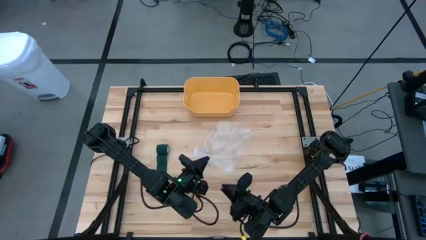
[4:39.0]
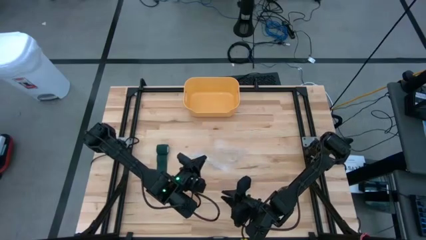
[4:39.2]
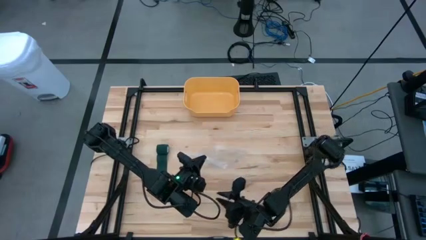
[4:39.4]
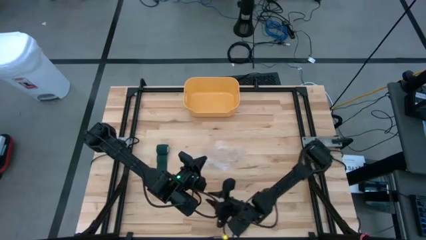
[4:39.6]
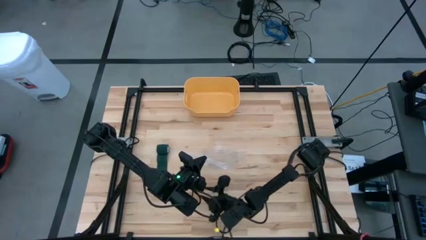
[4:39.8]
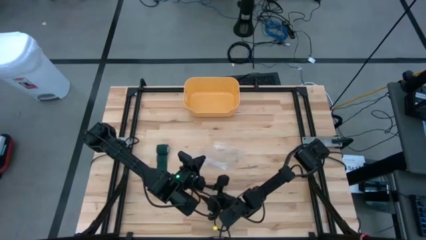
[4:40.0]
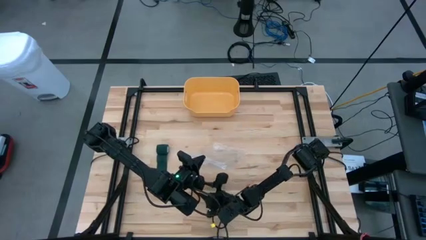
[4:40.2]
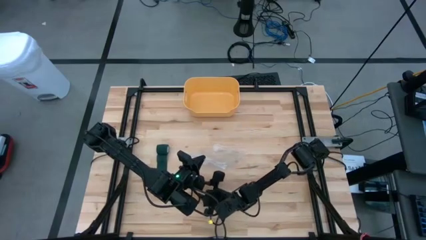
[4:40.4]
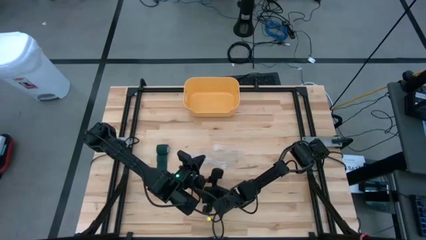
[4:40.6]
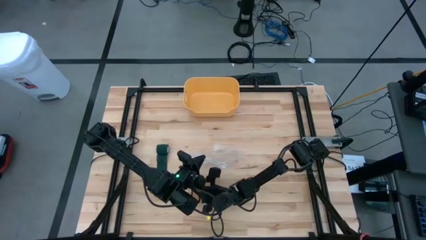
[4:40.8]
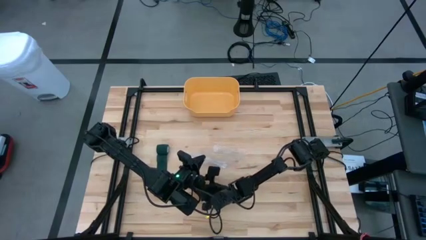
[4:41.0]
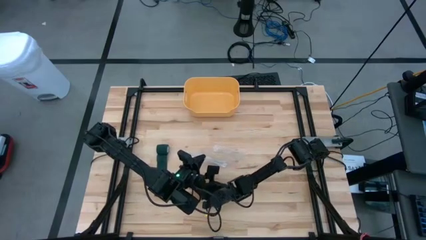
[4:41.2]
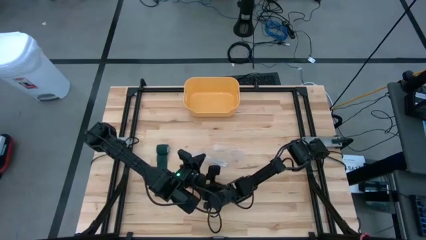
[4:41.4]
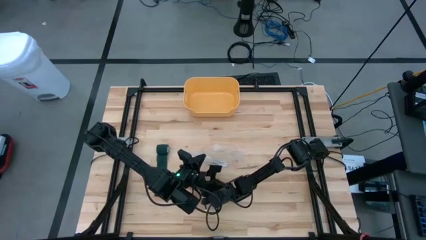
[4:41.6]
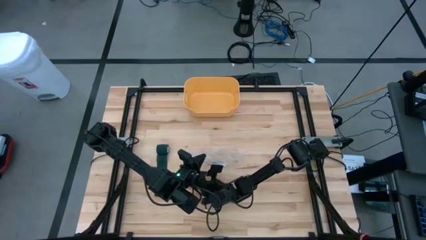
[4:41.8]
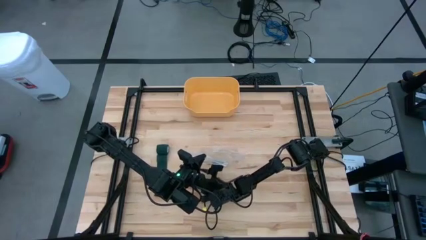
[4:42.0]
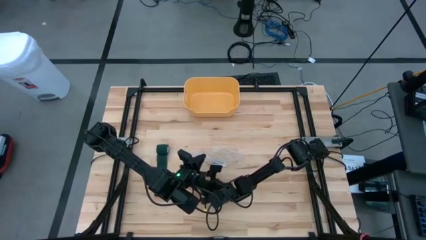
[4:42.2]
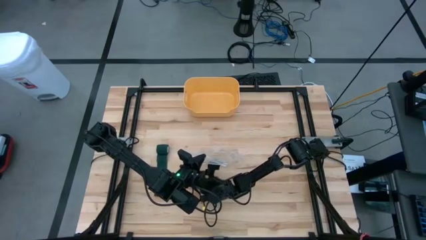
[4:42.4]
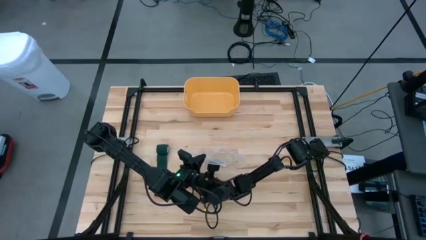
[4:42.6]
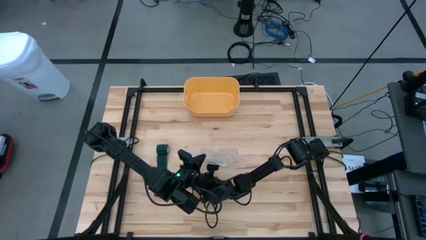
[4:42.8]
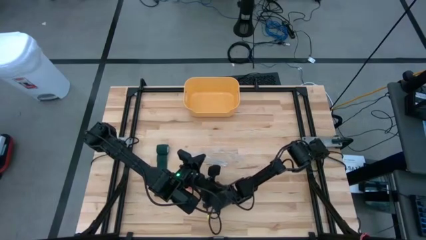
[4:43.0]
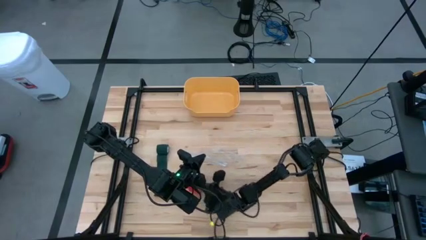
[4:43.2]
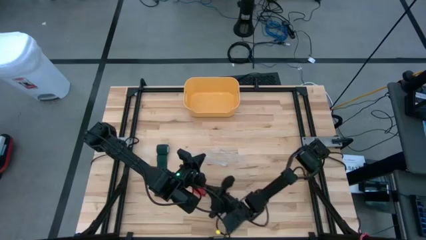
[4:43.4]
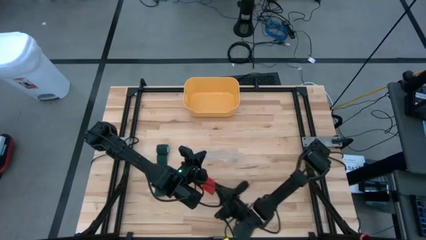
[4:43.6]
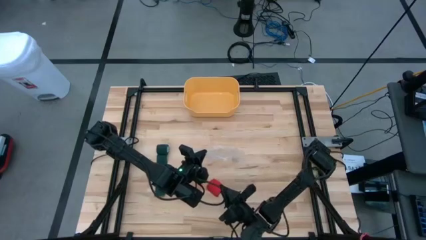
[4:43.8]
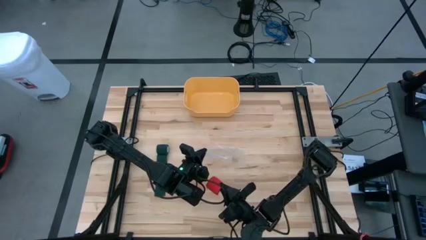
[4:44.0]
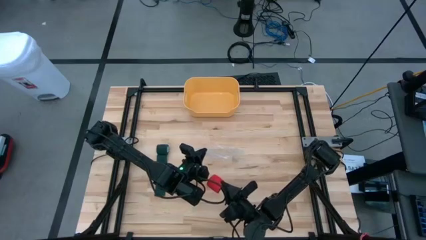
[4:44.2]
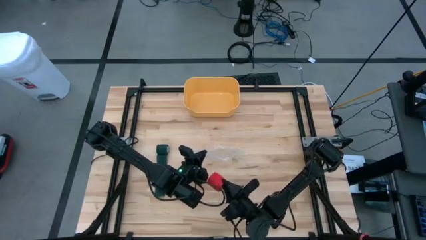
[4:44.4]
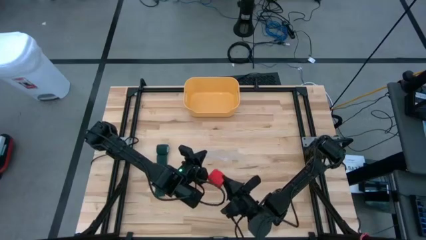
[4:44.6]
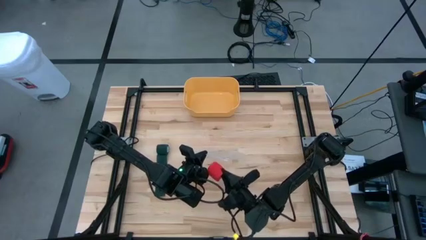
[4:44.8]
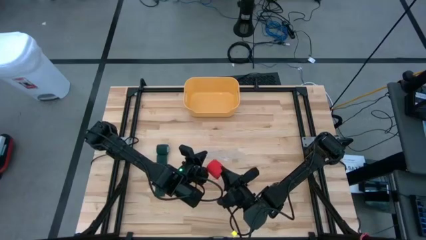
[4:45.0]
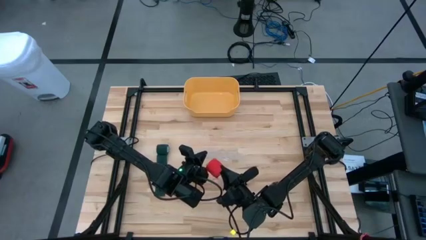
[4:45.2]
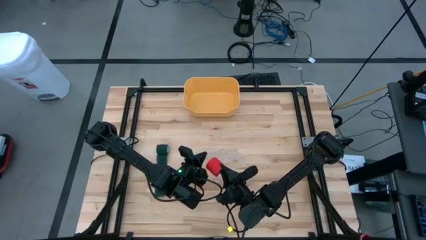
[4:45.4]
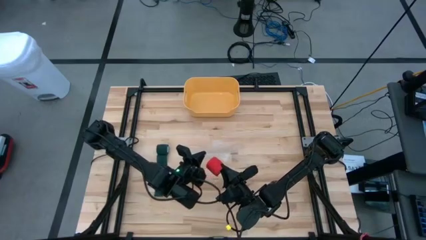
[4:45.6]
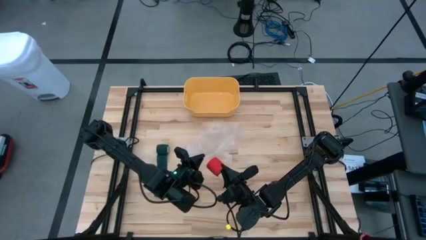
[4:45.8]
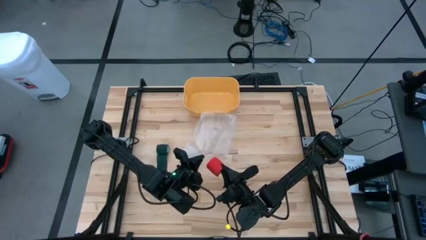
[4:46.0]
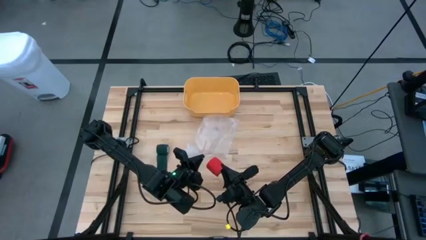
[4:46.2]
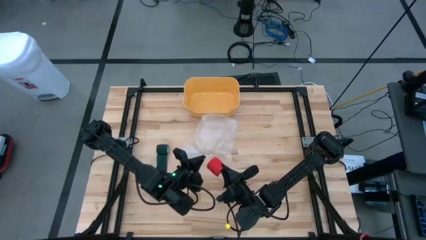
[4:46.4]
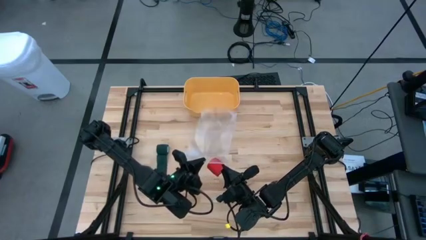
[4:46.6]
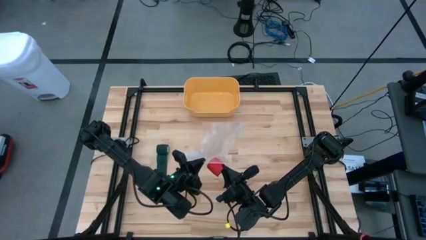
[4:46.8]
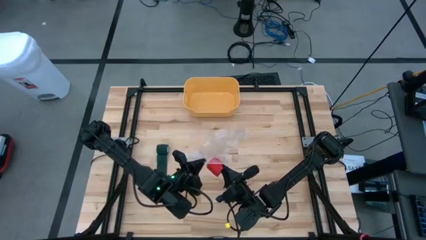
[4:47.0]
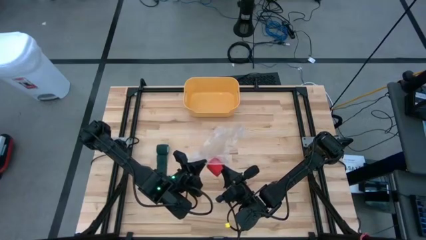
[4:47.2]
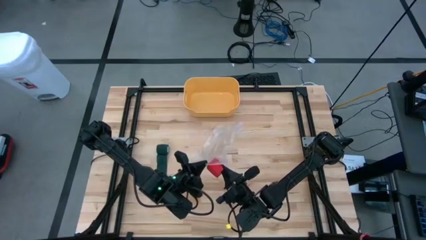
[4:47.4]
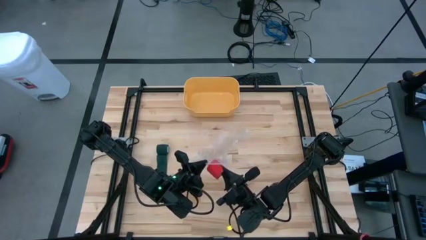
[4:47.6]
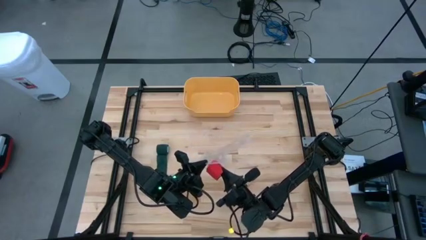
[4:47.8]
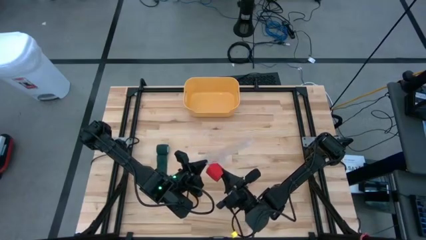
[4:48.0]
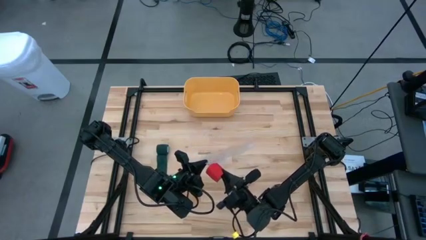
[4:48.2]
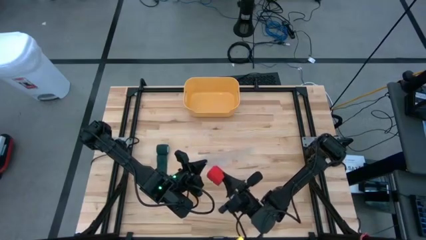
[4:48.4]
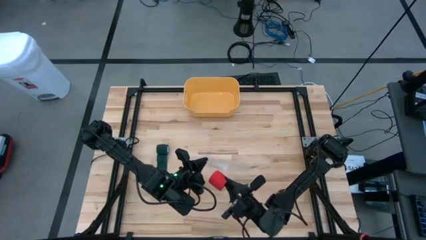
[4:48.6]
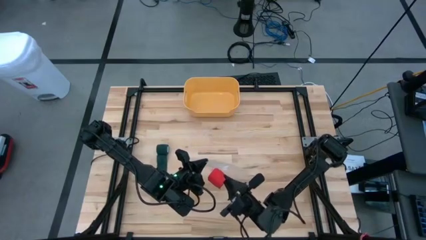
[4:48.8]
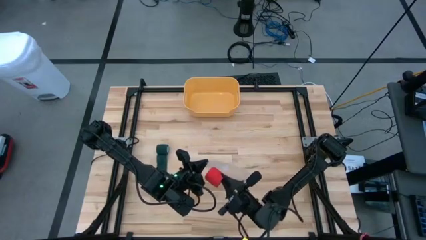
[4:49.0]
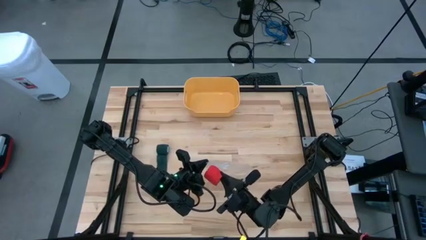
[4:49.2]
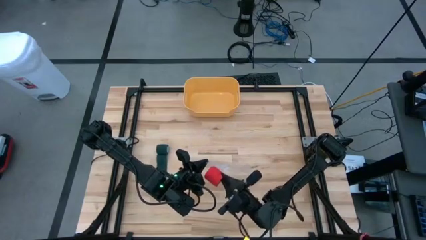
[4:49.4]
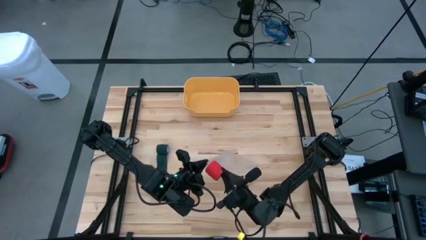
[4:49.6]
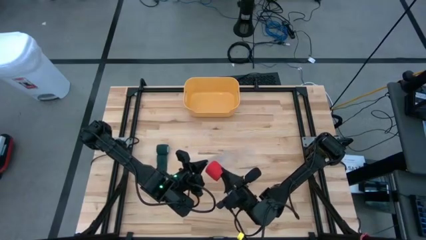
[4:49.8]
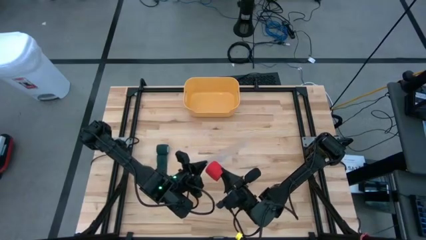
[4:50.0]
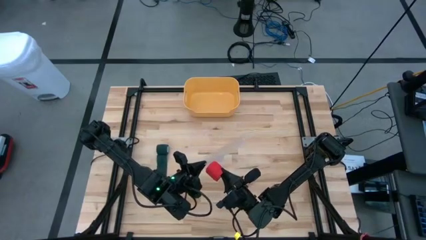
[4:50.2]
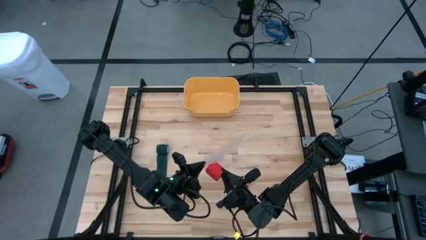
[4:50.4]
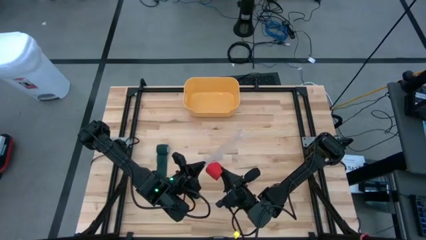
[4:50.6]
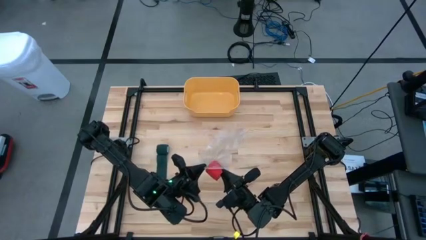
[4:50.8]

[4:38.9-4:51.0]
Task: Roll bandage
Put the rolled red bandage into the transparent zip bag

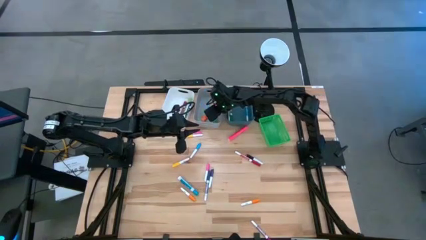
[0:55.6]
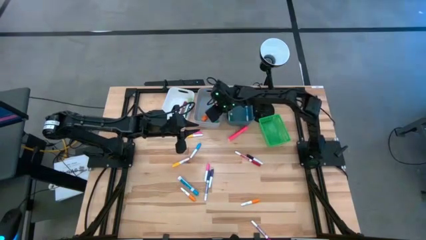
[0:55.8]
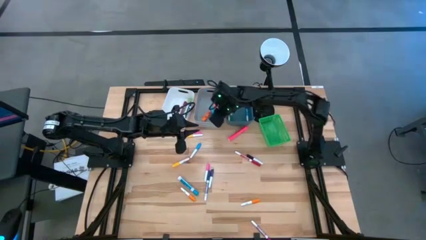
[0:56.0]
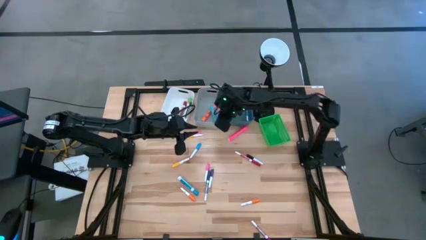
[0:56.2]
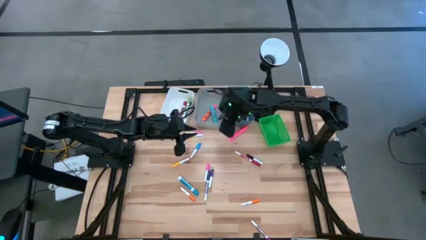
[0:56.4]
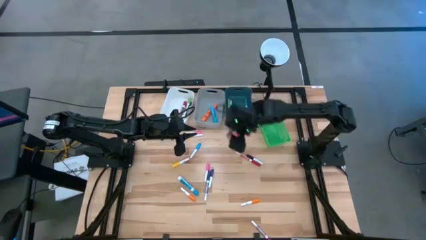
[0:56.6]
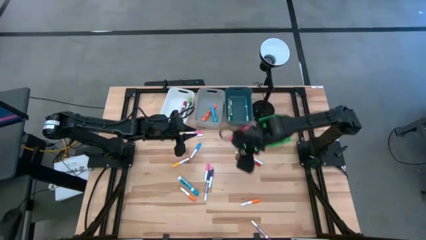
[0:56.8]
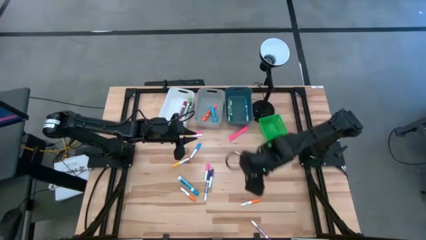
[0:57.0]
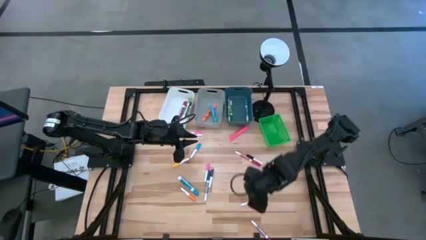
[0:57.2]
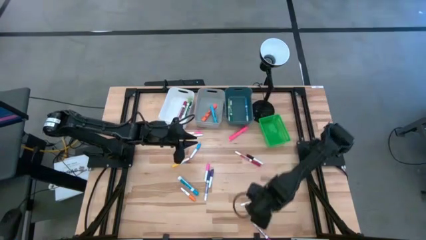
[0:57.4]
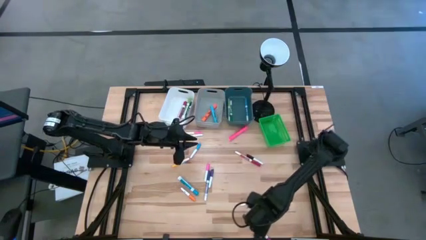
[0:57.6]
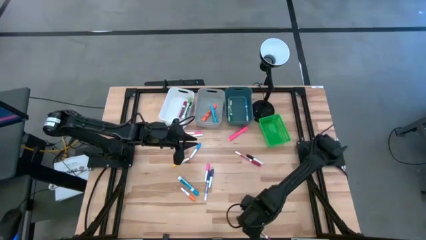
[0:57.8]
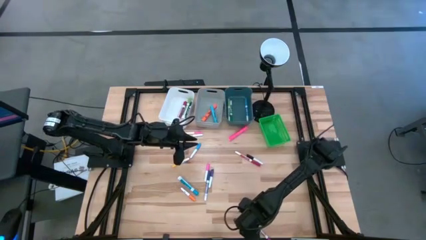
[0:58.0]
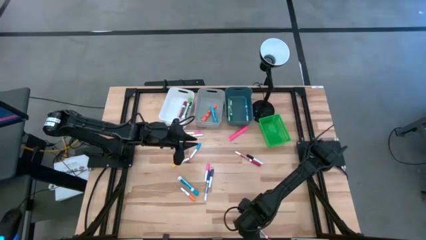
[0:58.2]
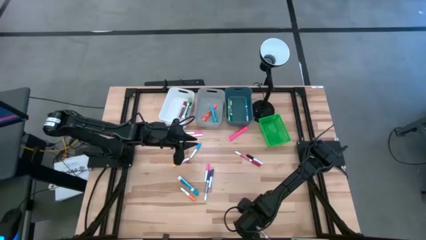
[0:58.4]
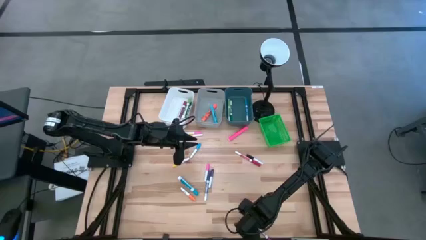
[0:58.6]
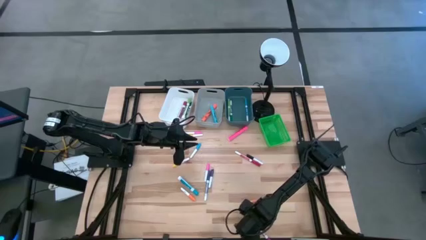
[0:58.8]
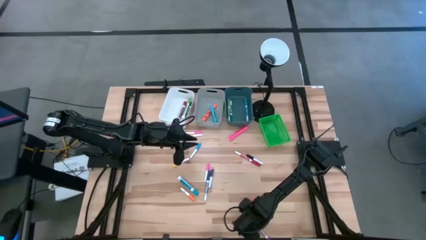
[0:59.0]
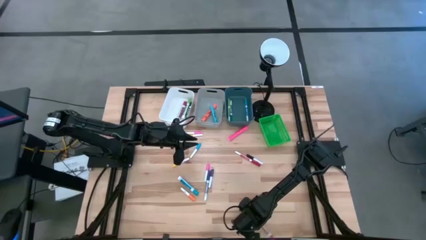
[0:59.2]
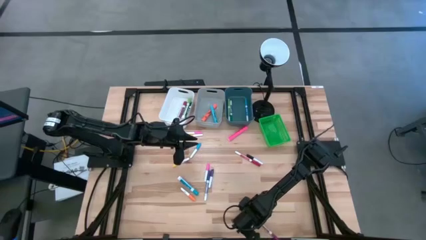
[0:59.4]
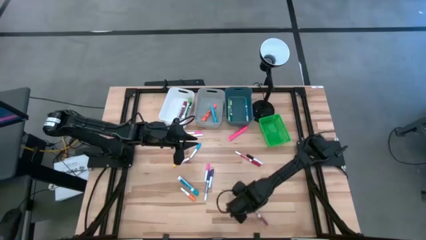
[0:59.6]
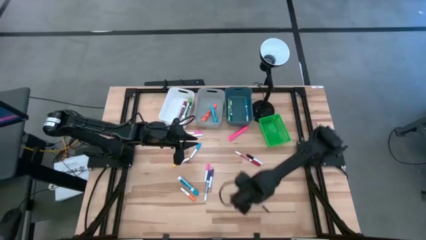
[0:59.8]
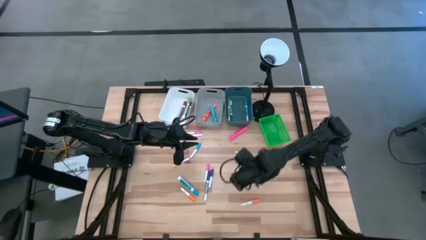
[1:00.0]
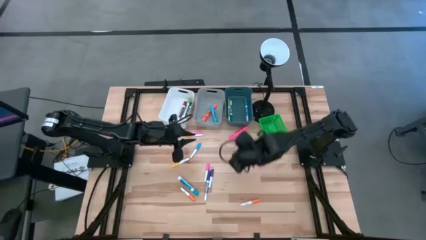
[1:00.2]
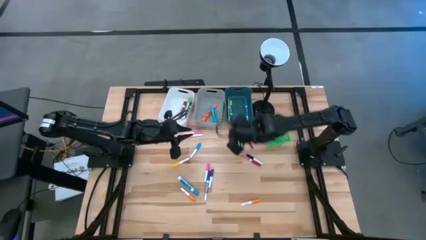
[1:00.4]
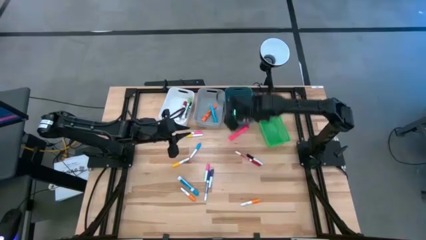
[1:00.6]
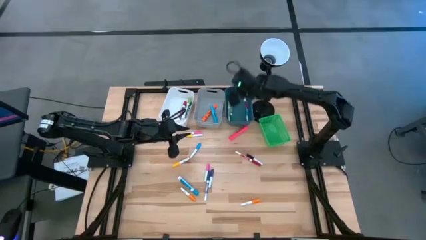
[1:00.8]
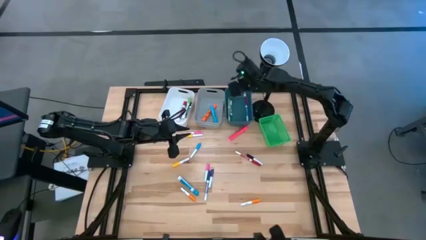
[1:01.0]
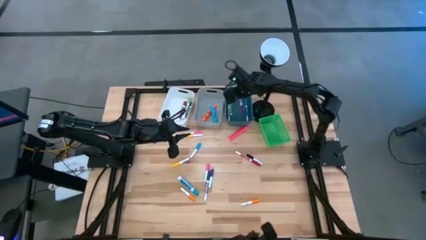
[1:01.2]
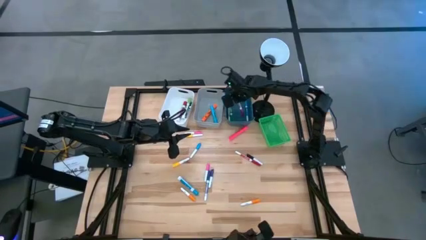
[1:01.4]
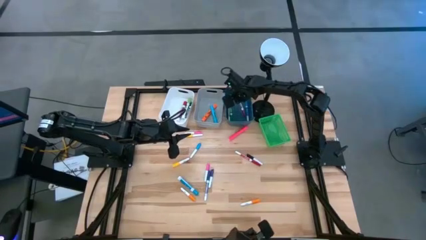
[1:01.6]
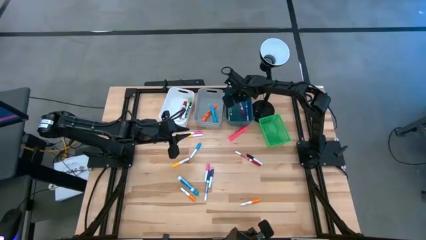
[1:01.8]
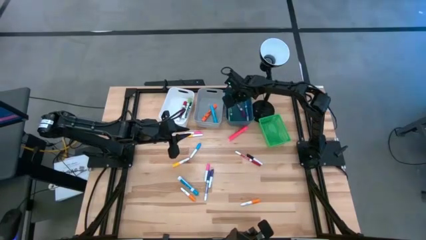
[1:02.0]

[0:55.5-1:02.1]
Task: Pick & Place Markers
Put the purple marker pen into the blue bin
